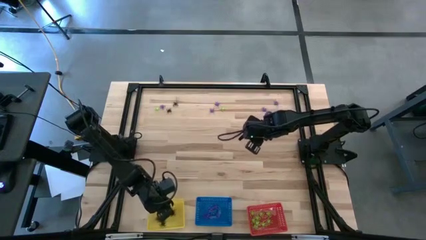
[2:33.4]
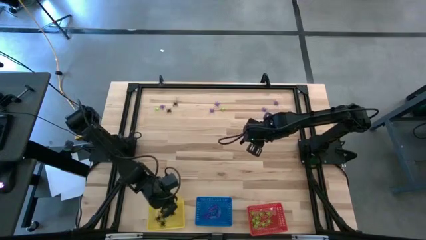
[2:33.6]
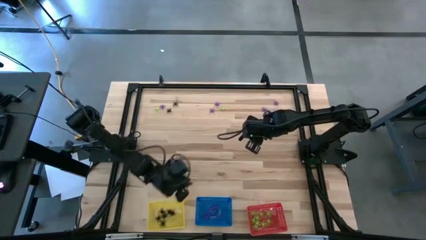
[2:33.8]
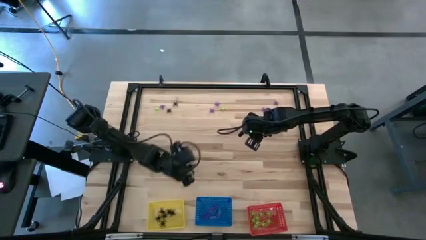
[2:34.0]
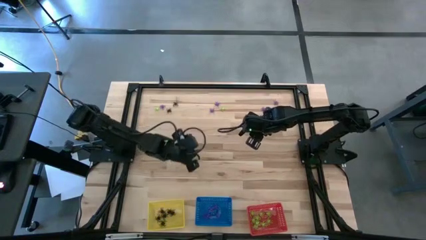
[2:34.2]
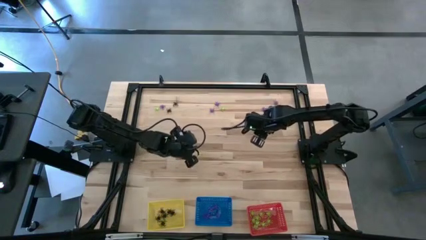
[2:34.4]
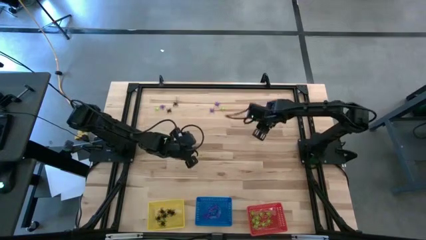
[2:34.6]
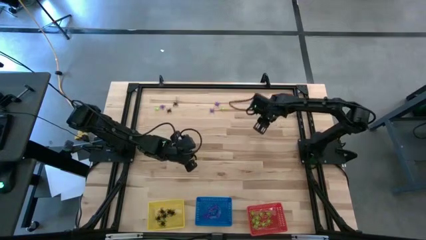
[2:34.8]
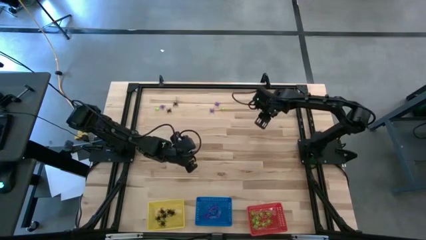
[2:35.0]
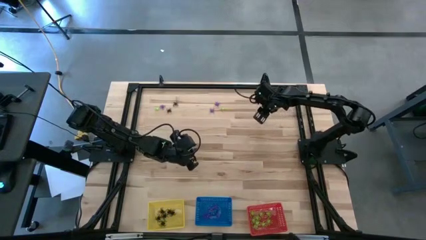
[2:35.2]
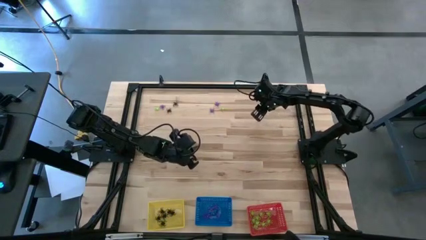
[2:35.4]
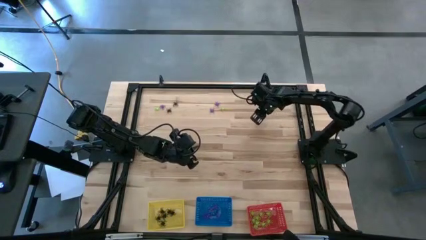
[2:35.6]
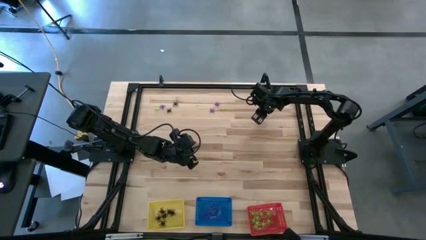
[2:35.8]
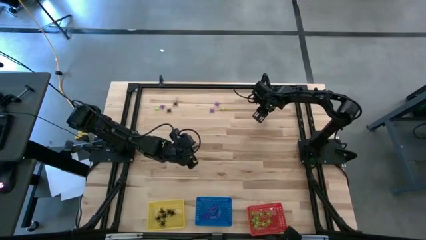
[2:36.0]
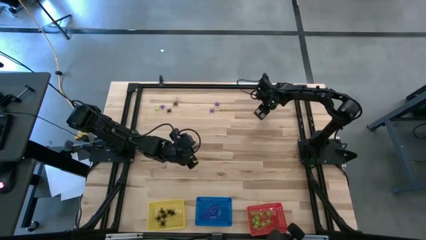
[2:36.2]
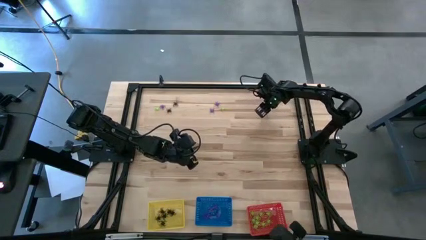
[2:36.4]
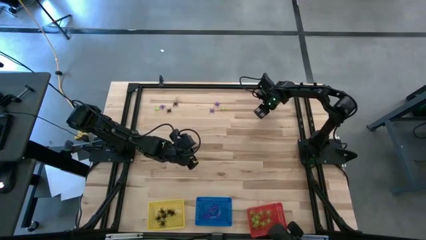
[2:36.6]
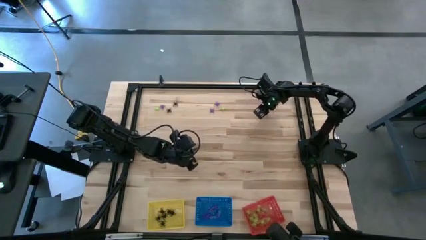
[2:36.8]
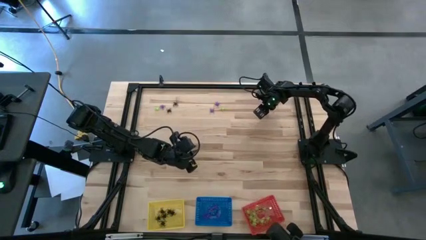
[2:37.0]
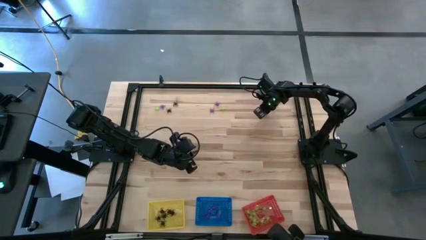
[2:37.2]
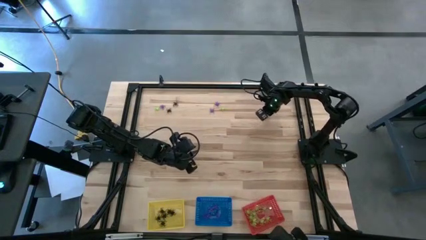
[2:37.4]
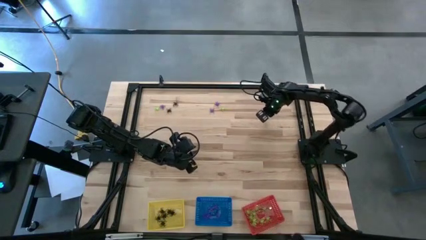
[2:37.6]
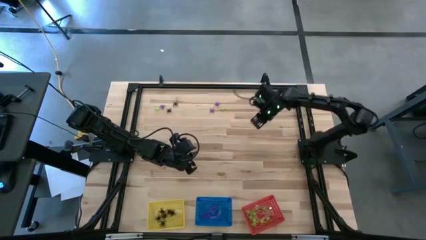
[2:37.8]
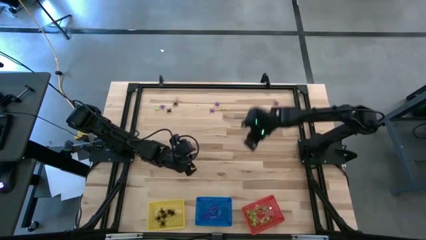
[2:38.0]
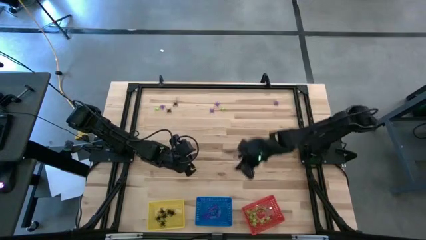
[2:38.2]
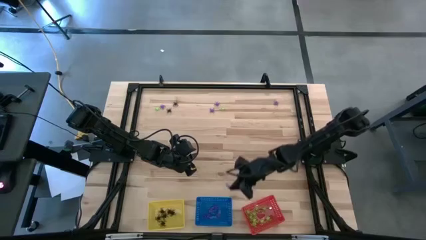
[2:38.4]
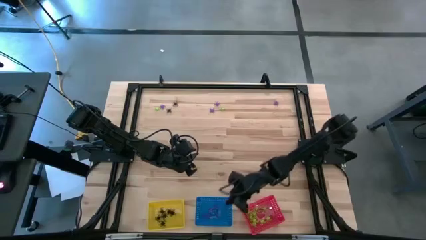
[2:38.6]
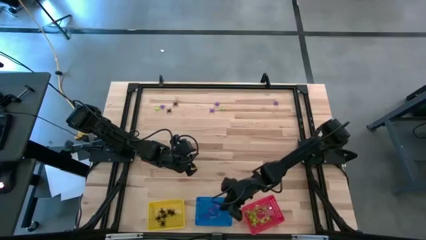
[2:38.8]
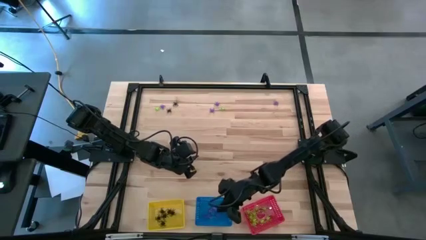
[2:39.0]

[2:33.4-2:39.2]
Task: Sort Halloween decoration
Put the violet spider toy into the blue bin

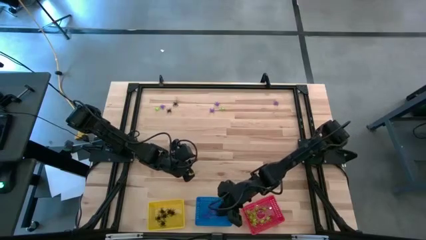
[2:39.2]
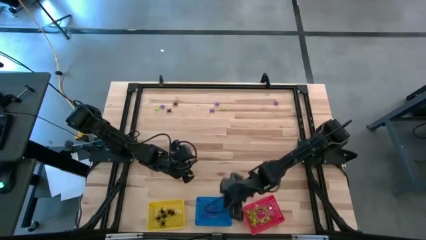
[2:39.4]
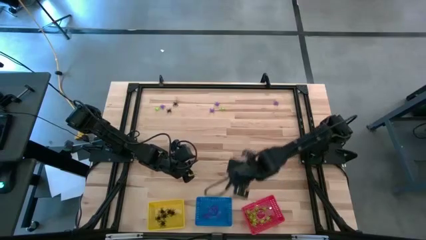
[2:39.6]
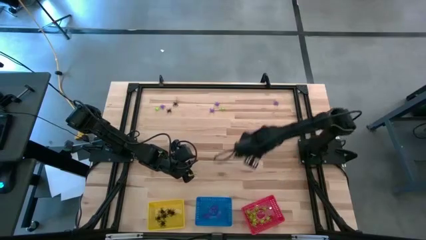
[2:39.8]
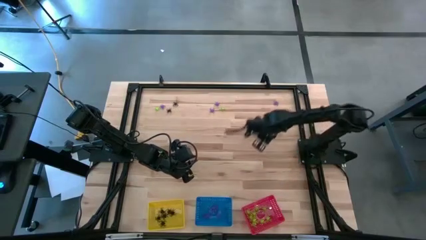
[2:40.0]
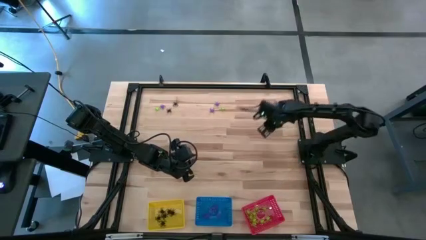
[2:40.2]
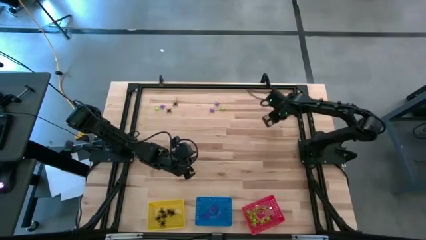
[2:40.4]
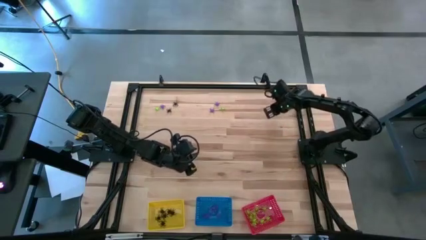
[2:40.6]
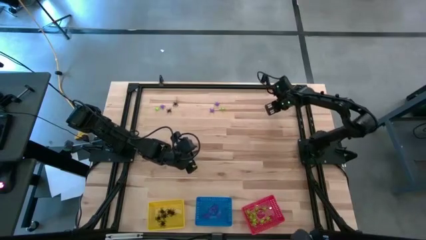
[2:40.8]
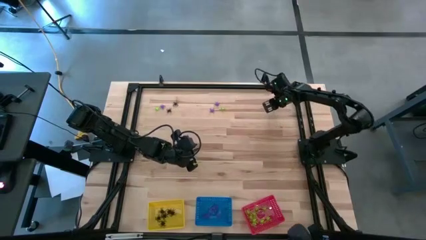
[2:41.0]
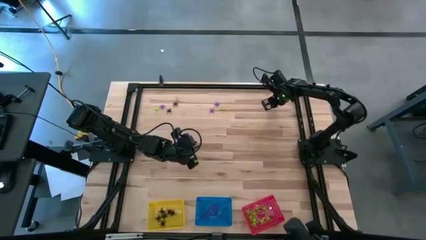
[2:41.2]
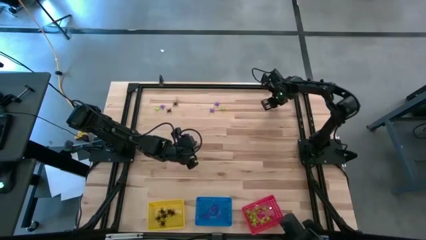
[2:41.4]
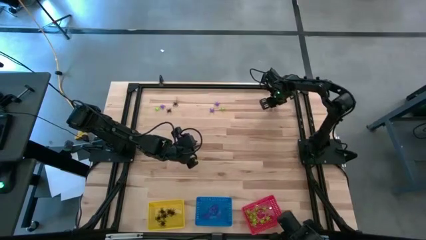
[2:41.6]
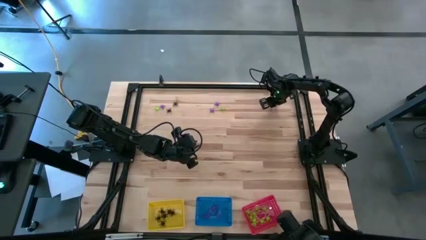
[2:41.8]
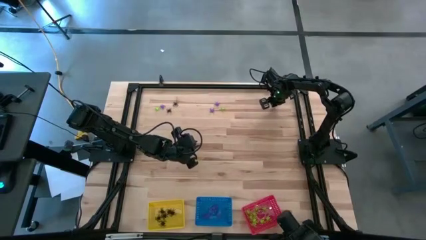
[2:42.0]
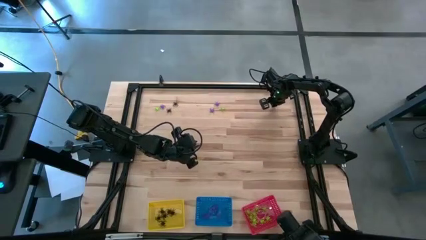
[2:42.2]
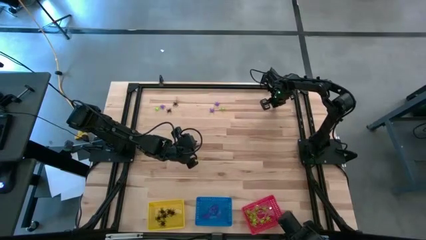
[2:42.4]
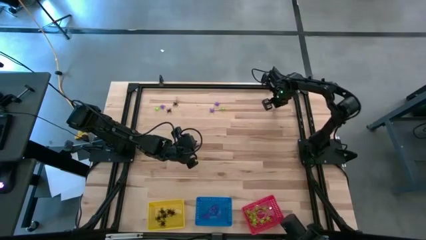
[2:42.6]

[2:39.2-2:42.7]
Put the violet spider toy into the blue bin

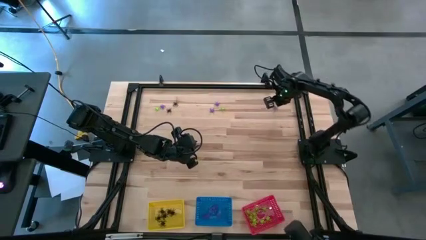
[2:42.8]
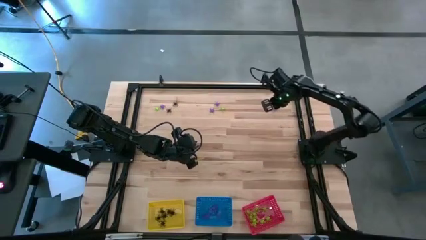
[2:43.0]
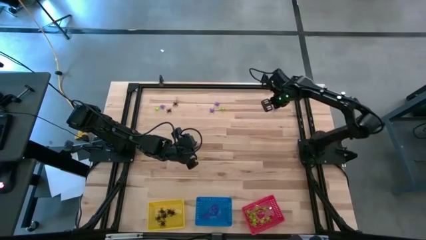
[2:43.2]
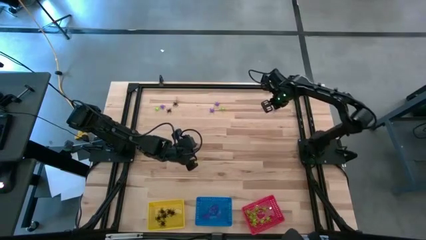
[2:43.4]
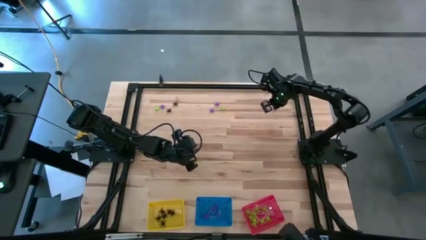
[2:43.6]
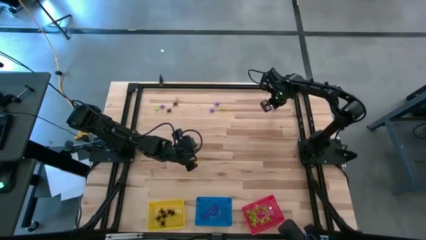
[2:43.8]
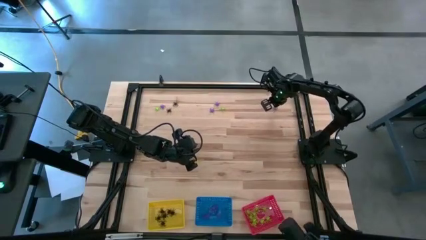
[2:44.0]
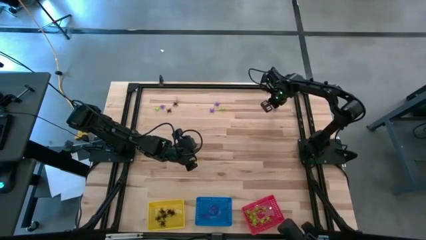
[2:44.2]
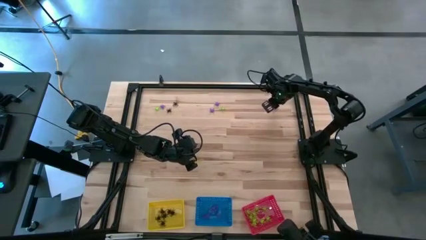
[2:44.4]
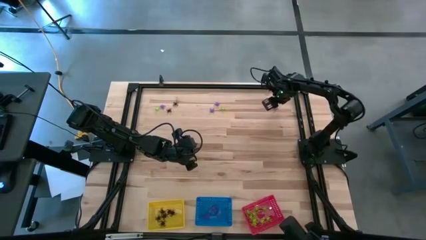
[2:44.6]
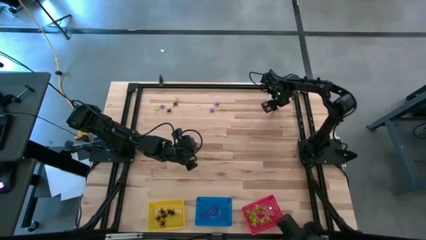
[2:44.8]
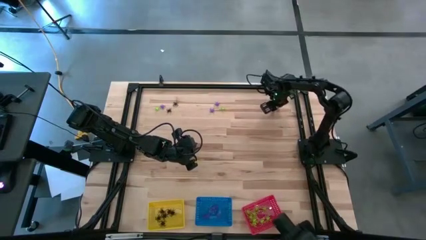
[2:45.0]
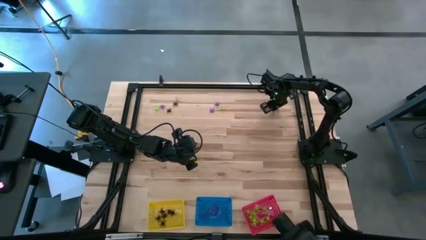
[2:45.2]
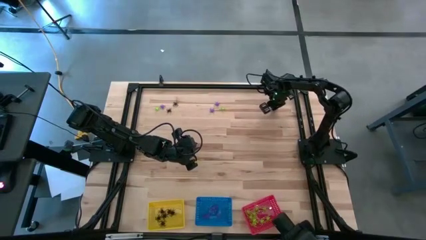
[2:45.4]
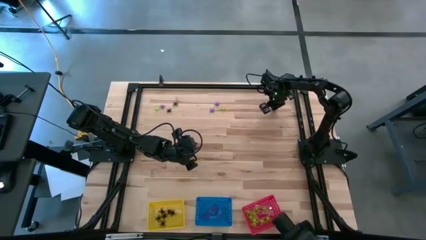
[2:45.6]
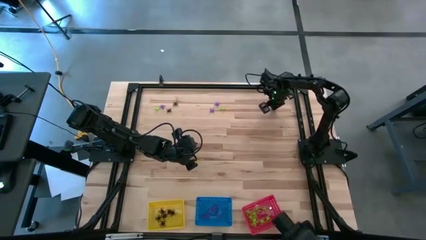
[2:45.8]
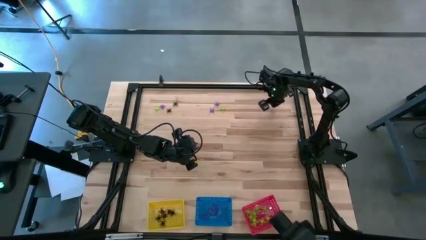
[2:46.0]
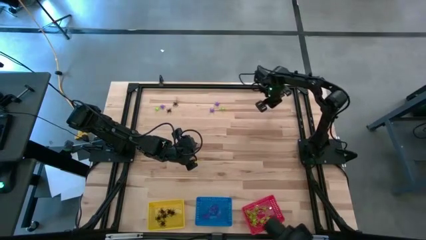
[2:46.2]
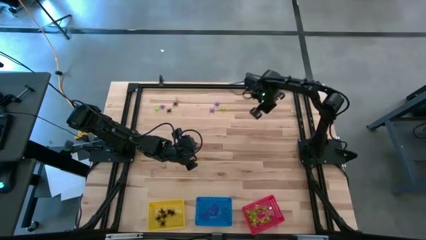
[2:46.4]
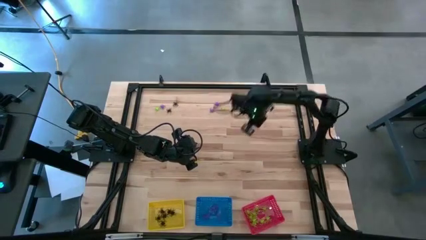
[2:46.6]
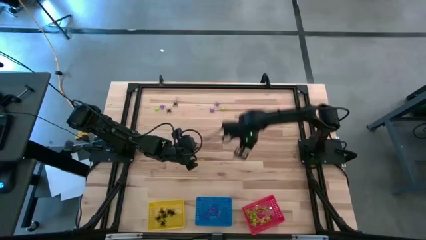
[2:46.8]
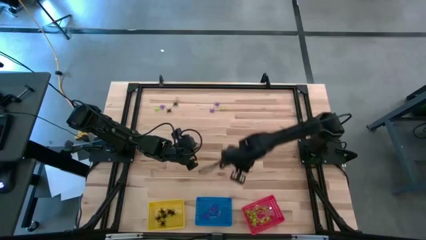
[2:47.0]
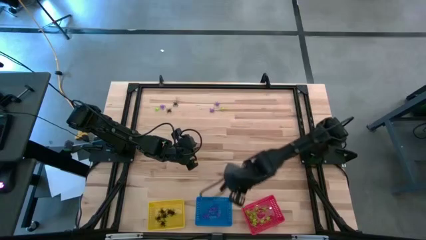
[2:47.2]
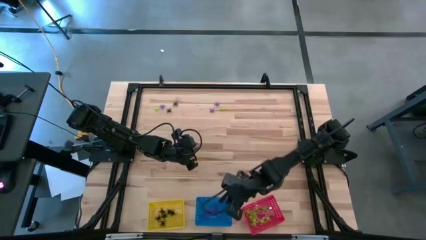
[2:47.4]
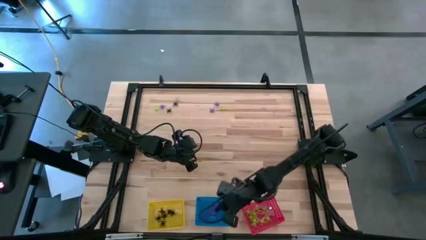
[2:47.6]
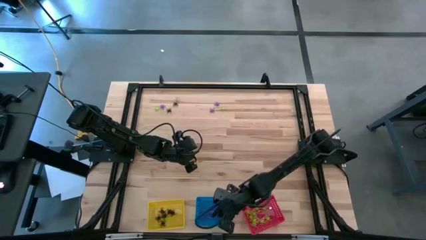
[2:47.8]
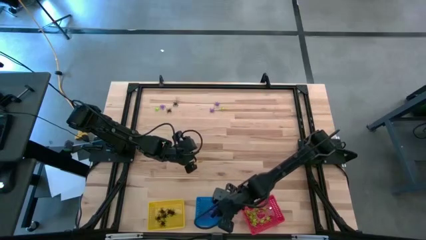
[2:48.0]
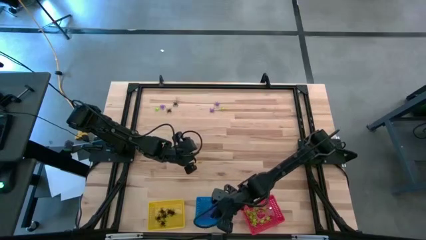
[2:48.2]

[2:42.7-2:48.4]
Put the violet spider toy into the blue bin

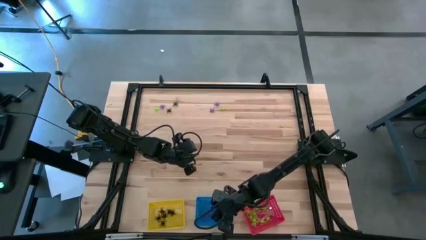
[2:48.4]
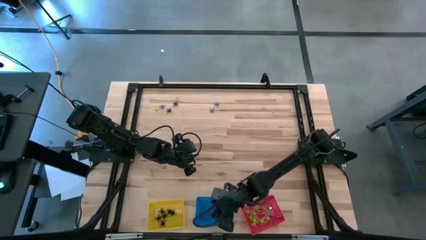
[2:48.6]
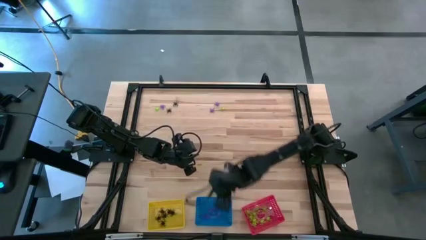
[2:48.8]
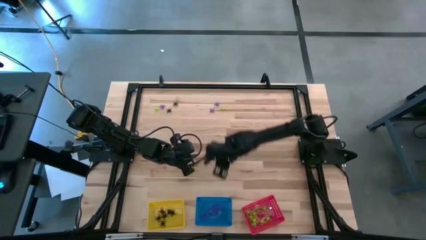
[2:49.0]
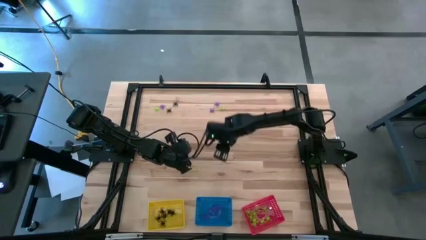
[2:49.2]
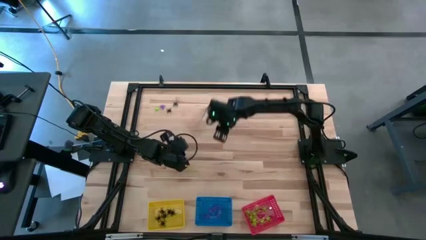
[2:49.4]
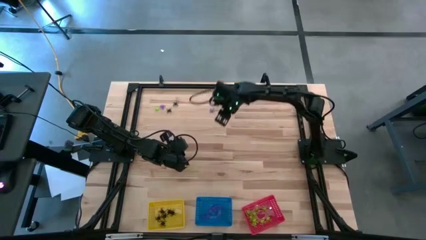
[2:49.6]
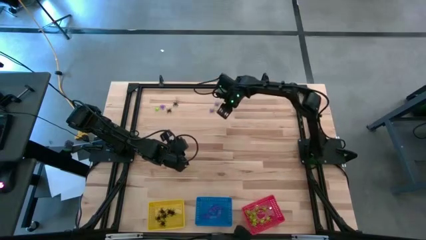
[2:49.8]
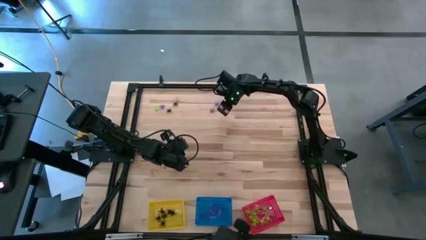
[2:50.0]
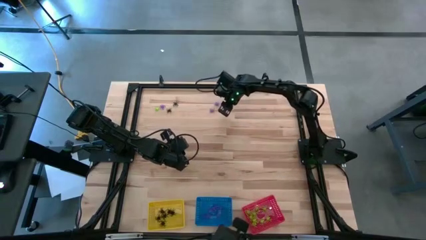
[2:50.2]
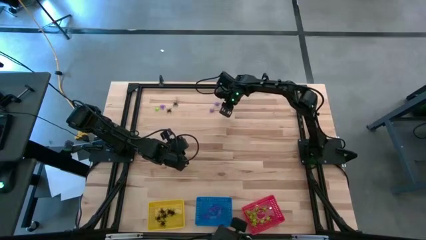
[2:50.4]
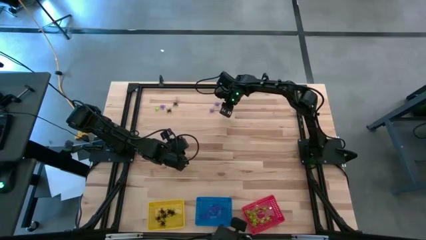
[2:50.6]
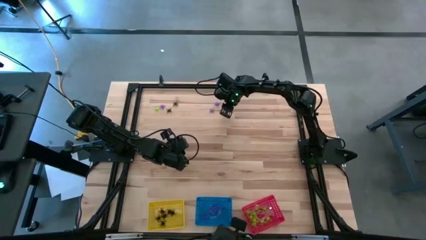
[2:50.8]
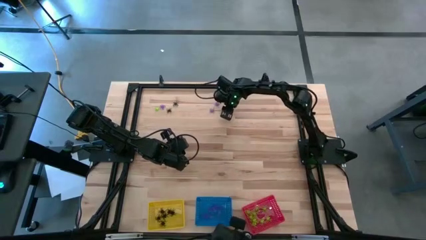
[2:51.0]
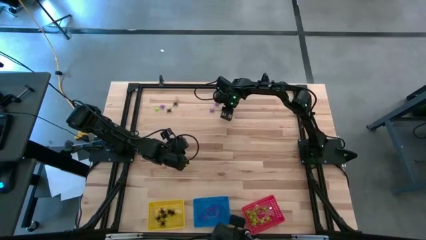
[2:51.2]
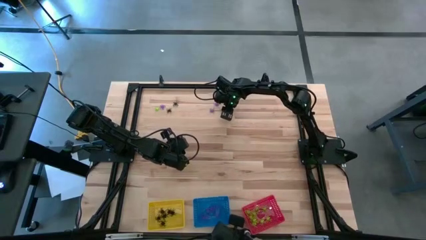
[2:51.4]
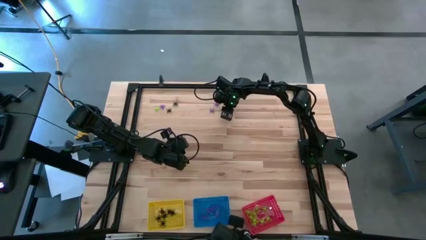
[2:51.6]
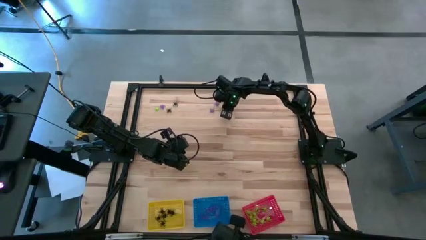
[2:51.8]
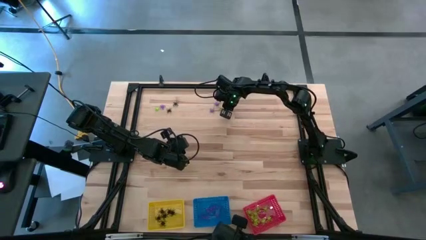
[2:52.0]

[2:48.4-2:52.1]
Put the green spider toy into the red bin
